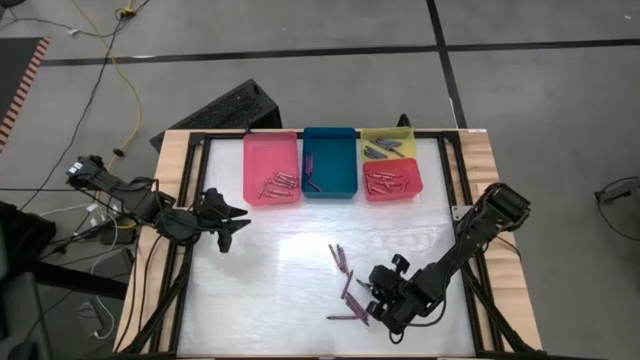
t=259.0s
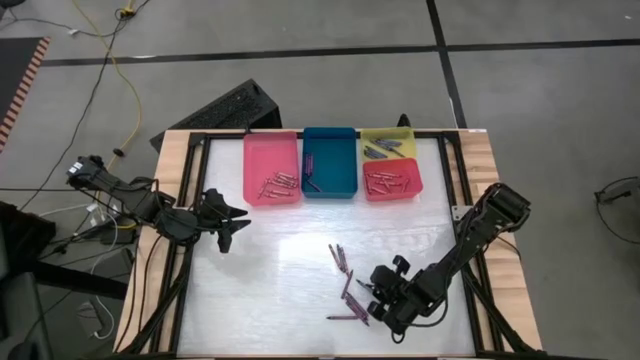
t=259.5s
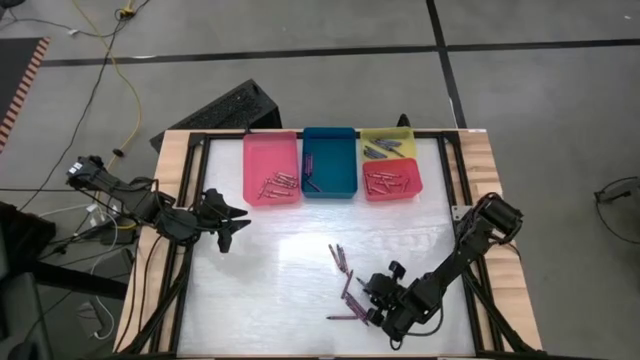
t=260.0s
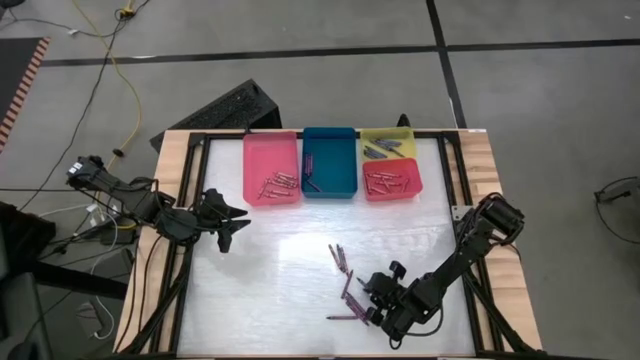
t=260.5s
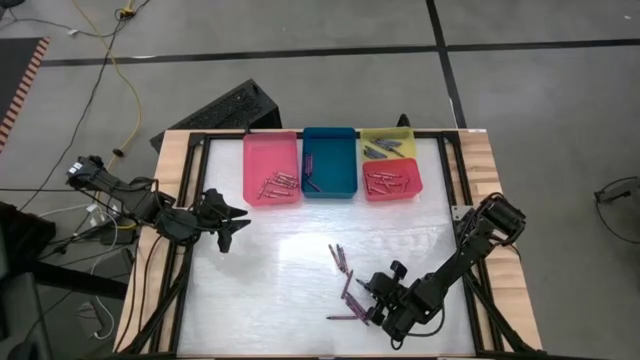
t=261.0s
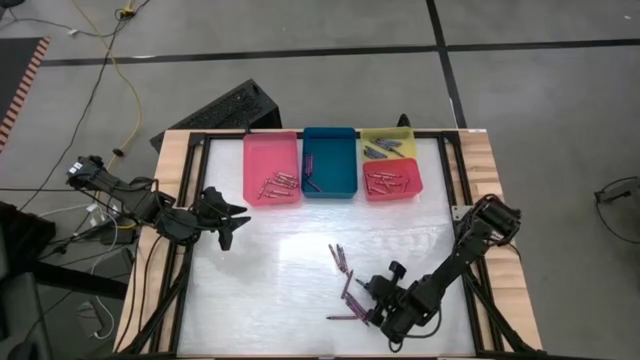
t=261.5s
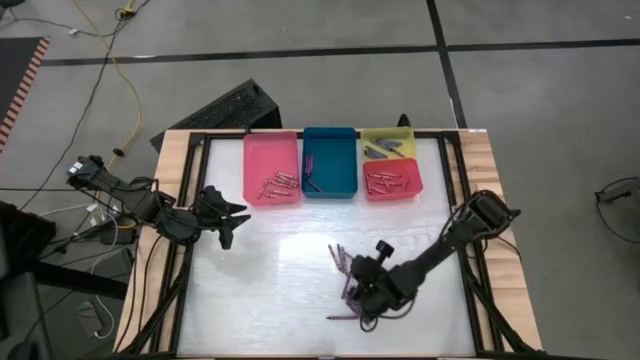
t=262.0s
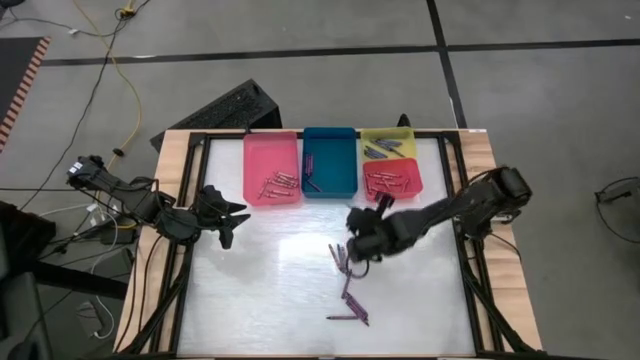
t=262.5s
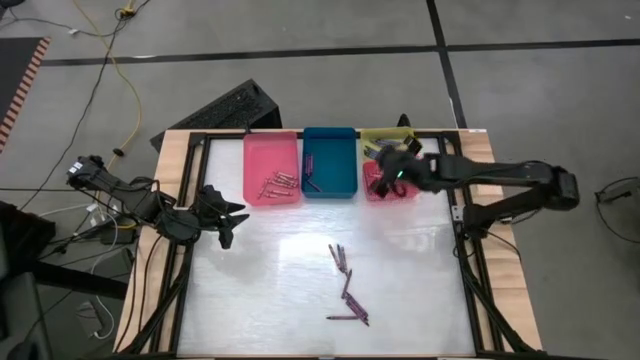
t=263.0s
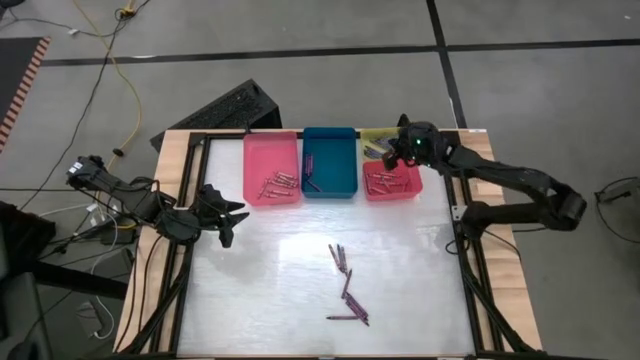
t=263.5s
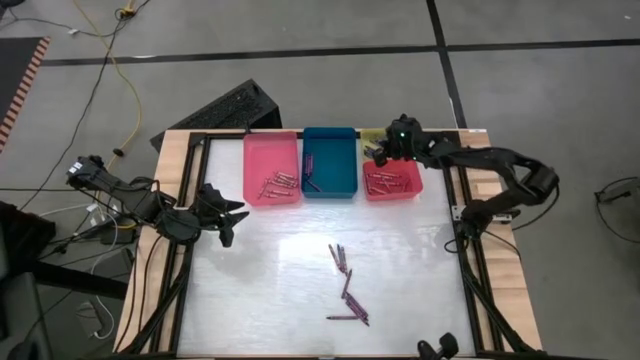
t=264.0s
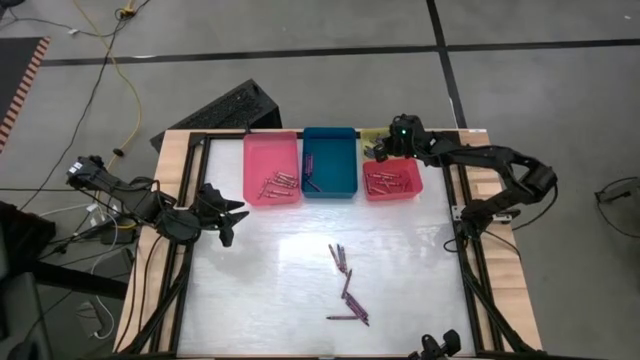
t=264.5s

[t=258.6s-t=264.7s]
Task: Sort crayons
Put the blue crayon into the yellow bin

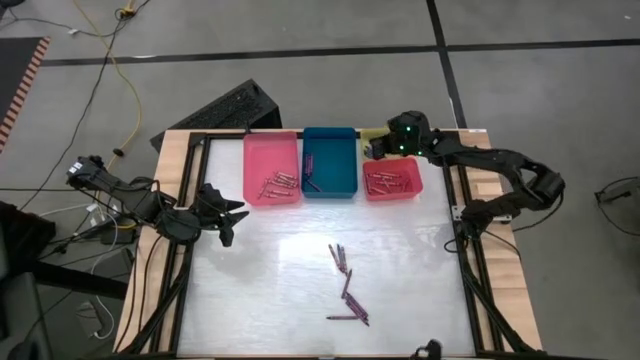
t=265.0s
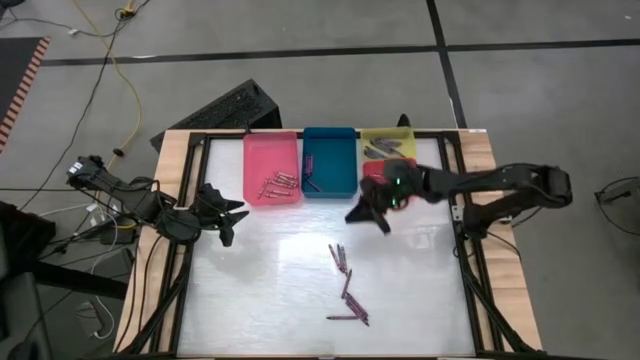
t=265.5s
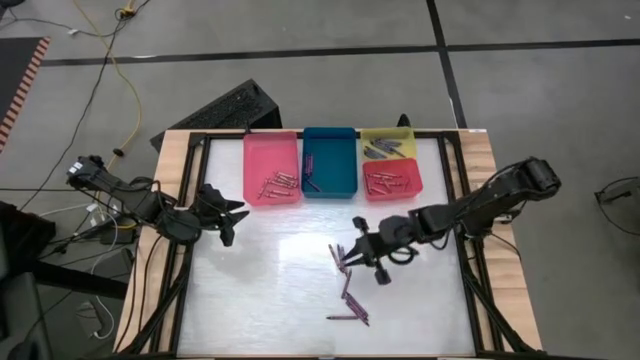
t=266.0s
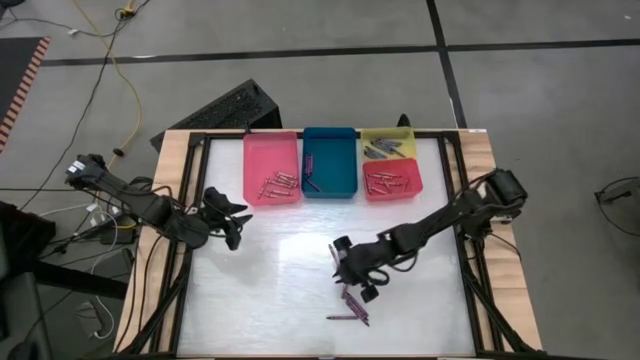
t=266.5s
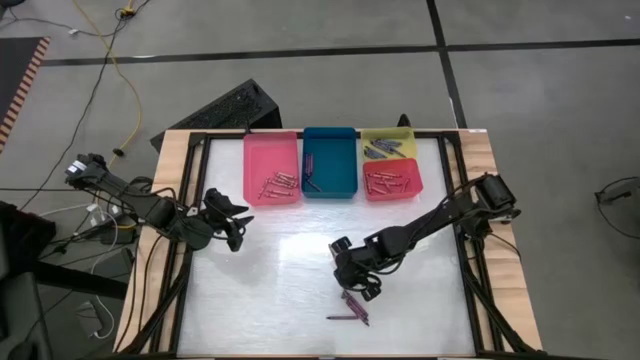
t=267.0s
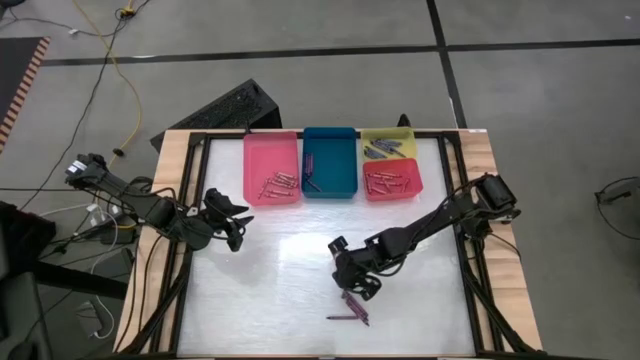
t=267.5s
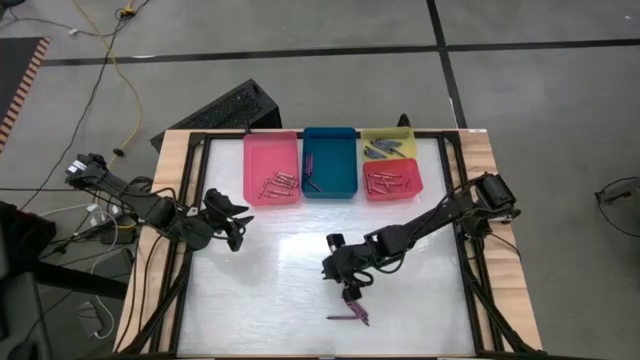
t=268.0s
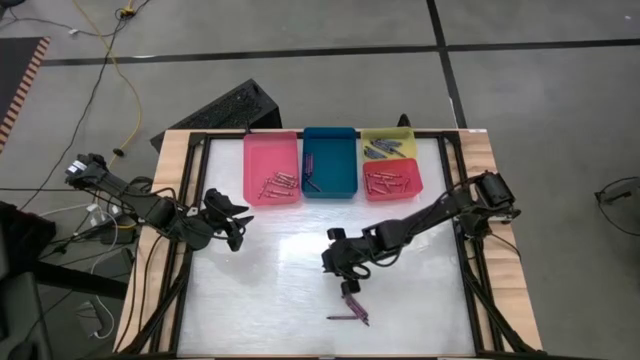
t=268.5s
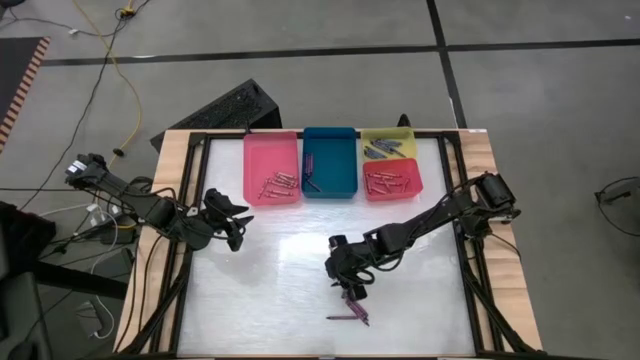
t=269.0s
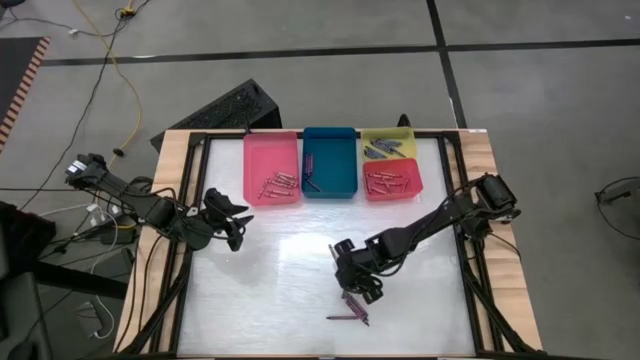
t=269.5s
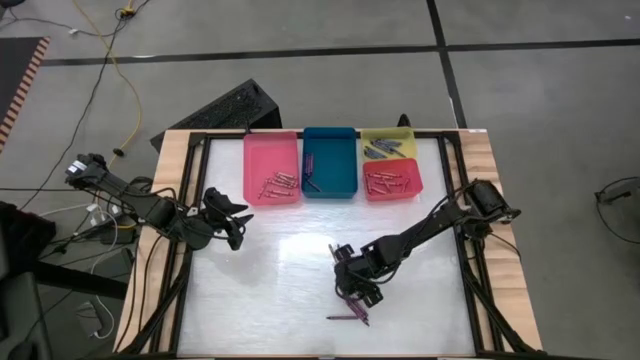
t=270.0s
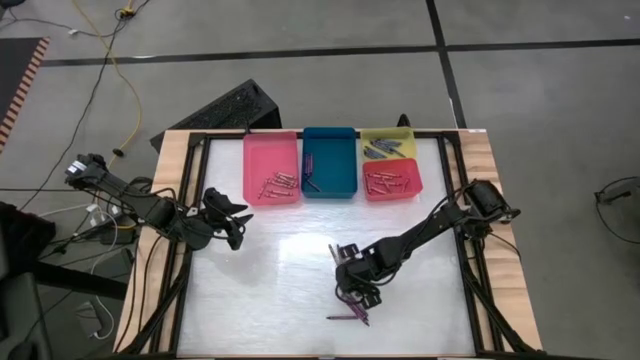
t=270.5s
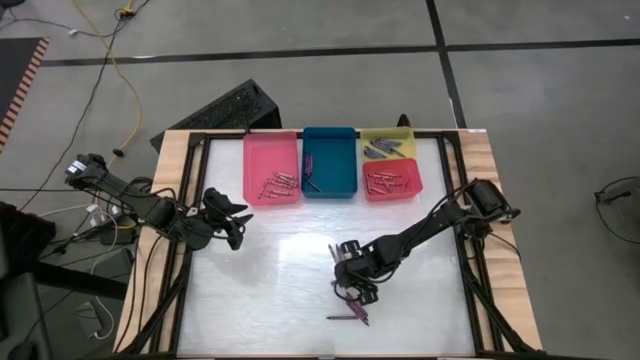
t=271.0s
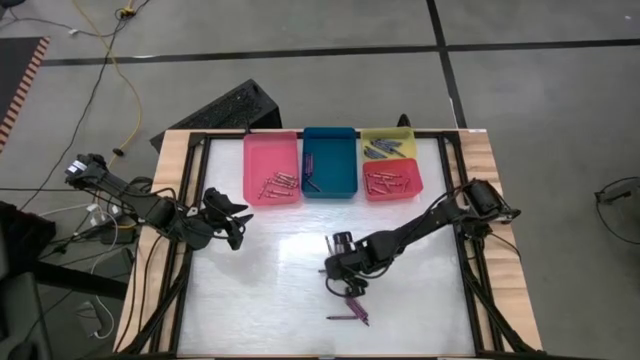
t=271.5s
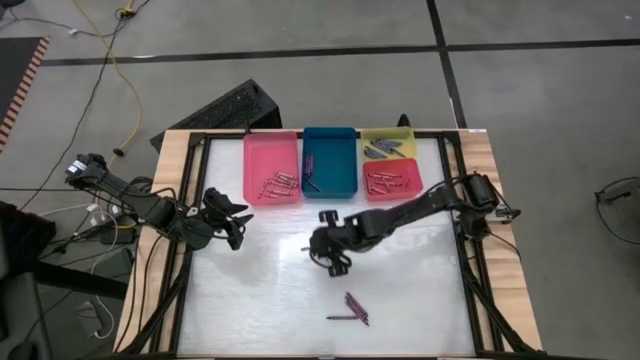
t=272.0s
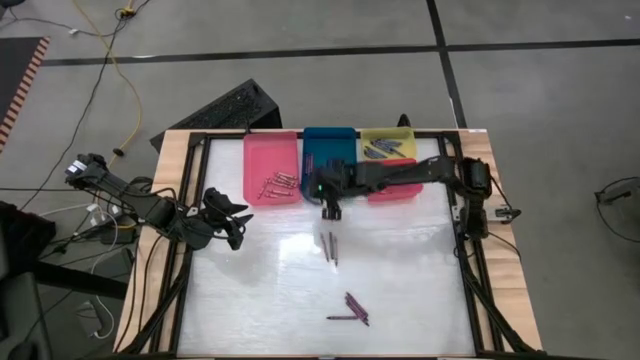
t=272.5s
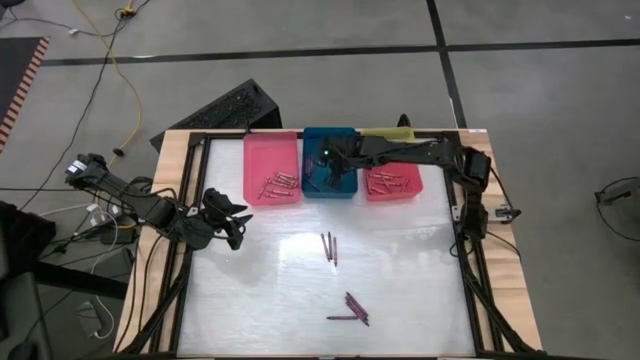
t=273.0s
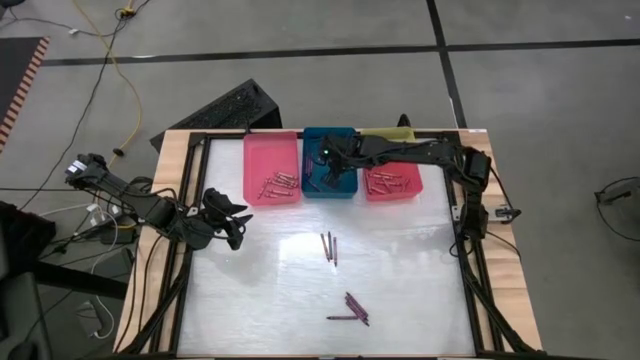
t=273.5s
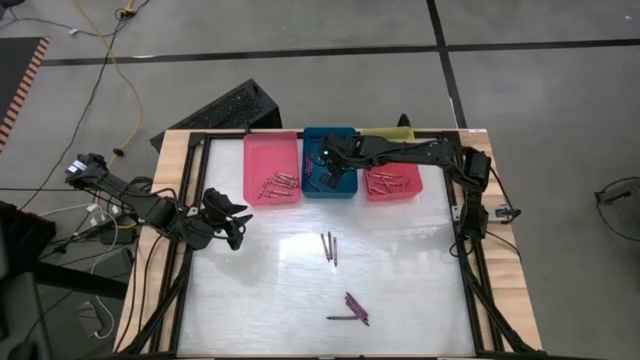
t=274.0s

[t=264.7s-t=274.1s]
Put the violet crayon into the blue bin

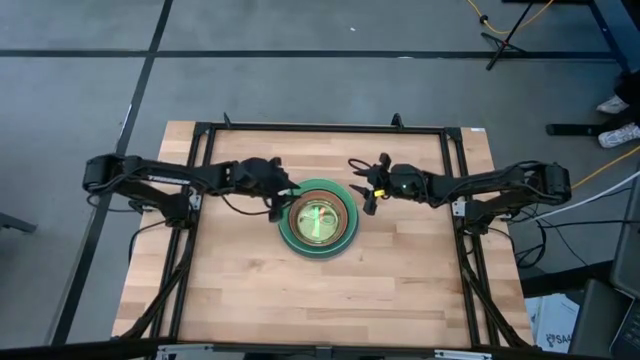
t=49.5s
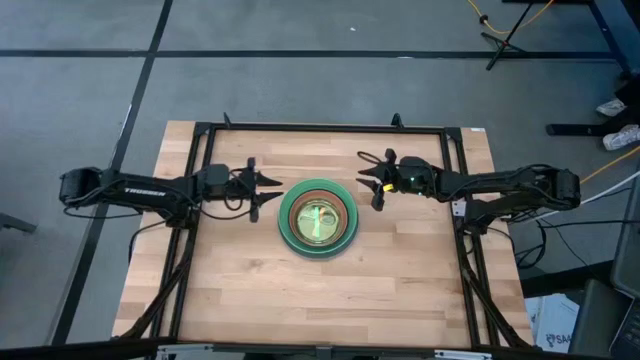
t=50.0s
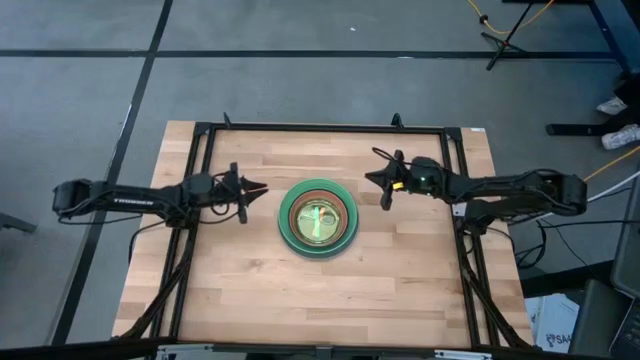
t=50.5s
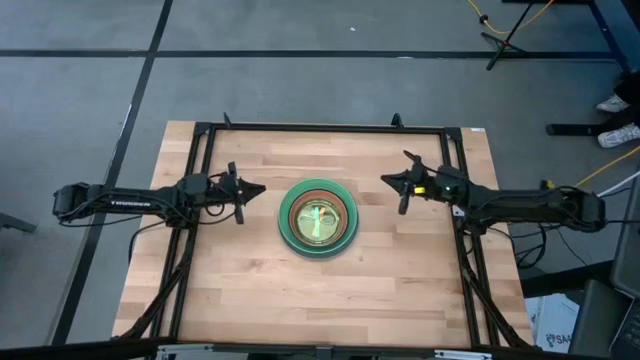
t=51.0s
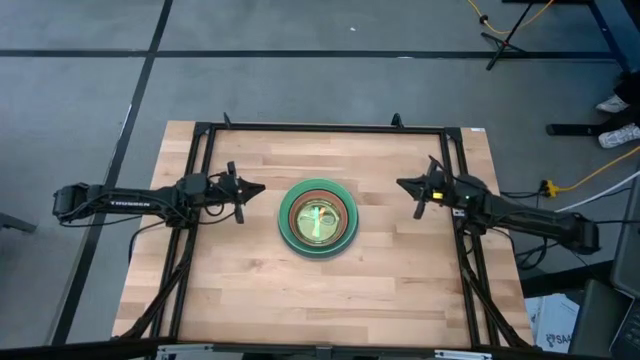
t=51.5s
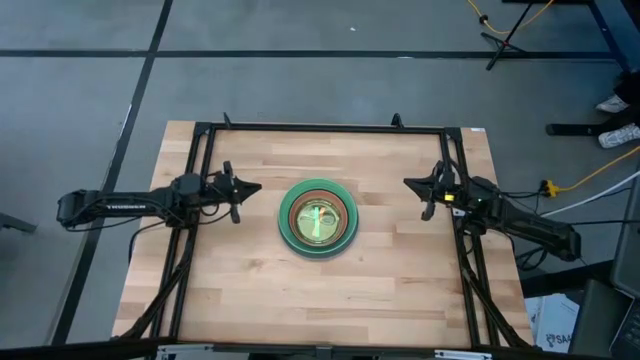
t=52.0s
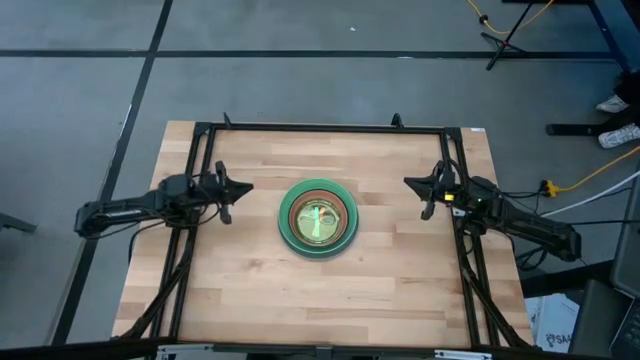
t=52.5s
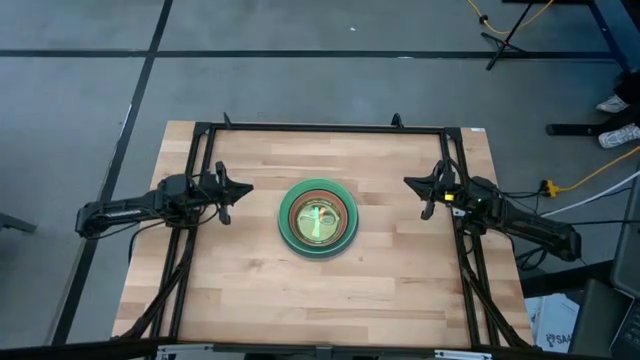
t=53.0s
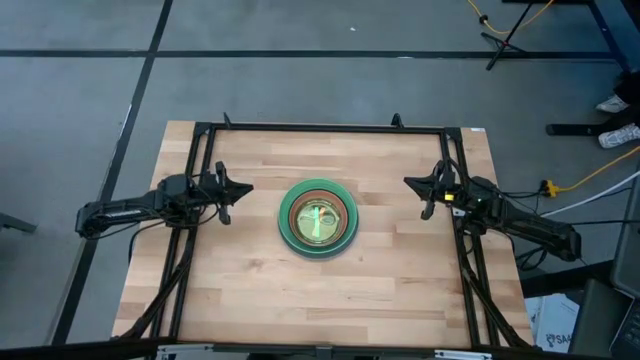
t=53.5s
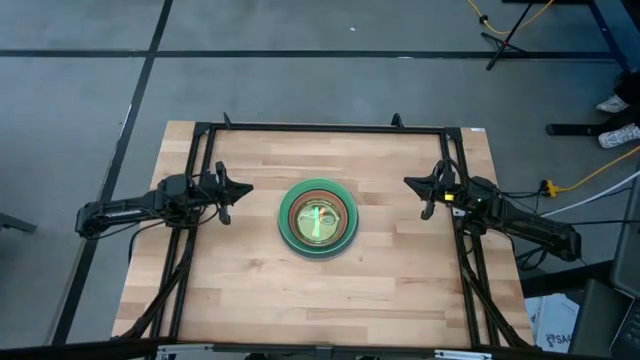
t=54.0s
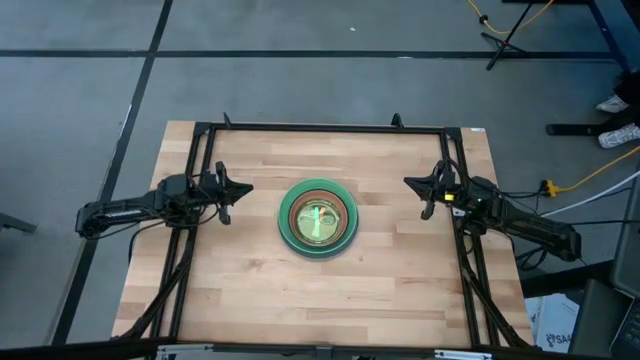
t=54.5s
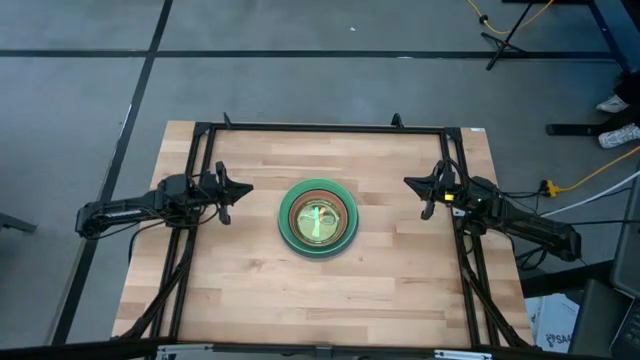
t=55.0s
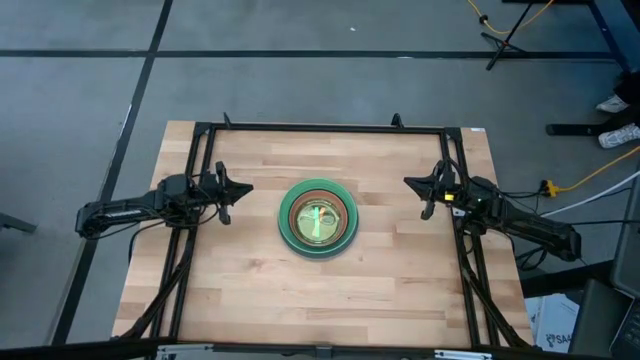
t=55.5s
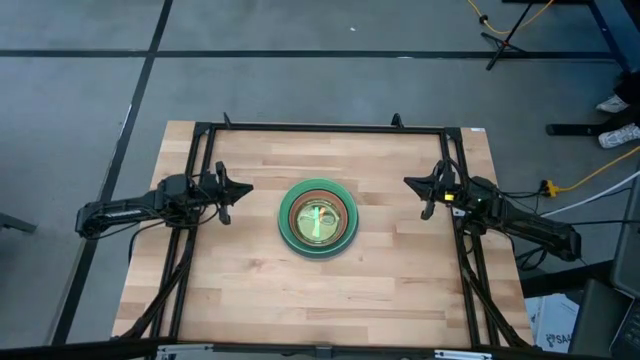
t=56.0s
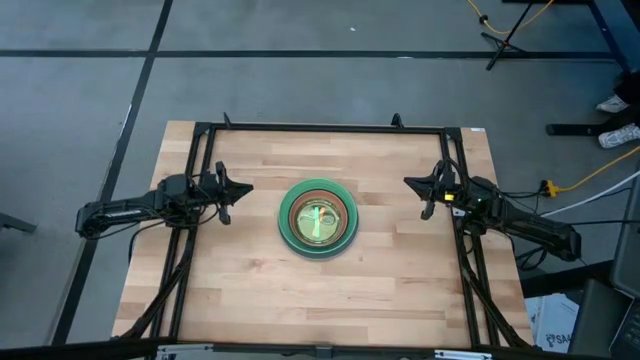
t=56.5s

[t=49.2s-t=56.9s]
Task: Stack plastic plates
Return to Home Position
